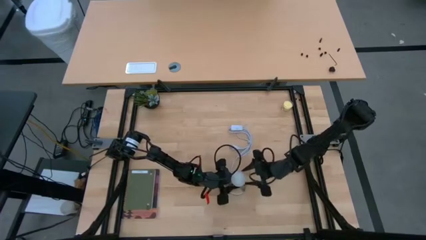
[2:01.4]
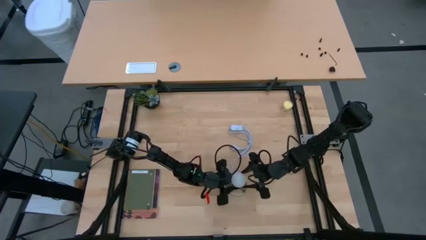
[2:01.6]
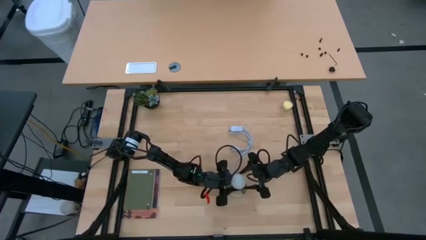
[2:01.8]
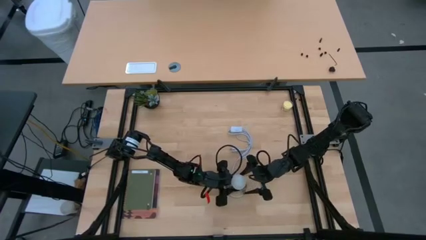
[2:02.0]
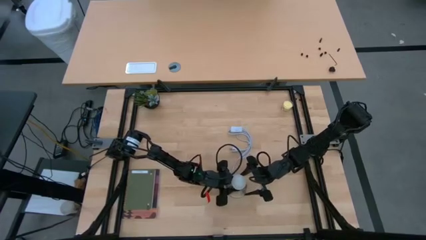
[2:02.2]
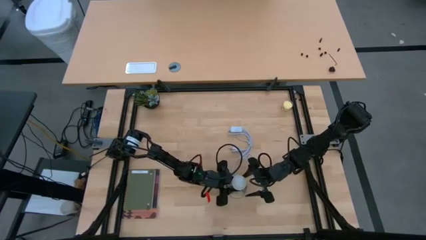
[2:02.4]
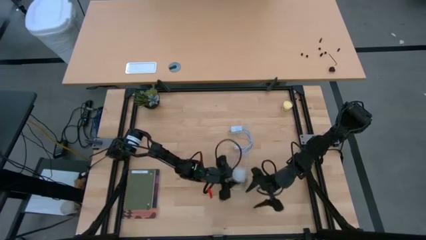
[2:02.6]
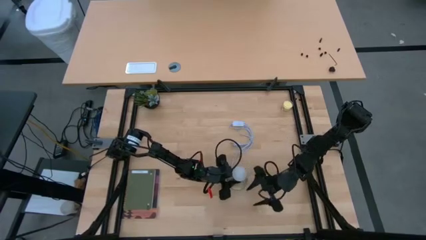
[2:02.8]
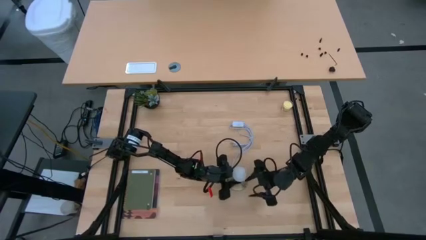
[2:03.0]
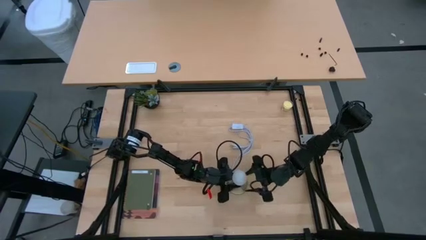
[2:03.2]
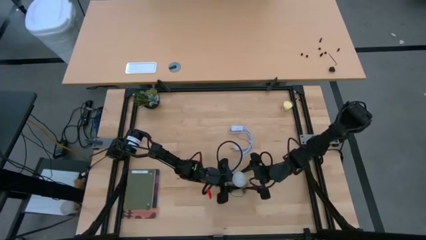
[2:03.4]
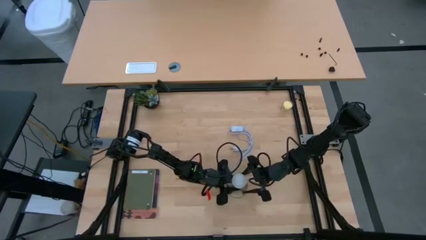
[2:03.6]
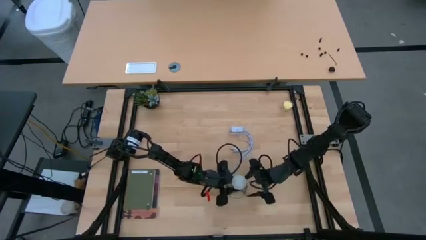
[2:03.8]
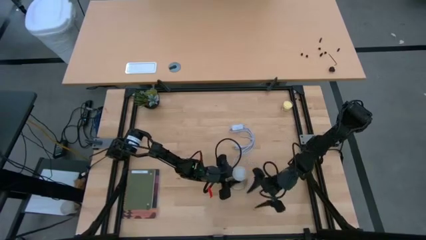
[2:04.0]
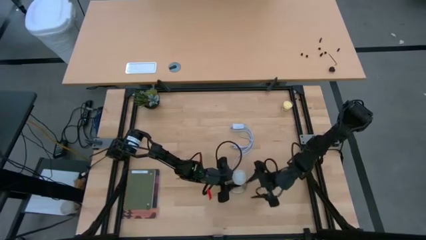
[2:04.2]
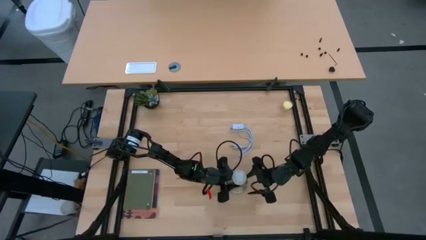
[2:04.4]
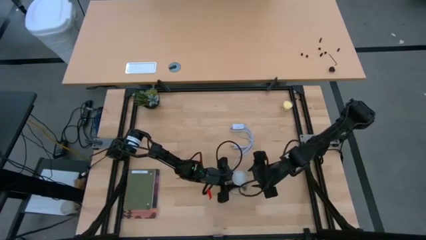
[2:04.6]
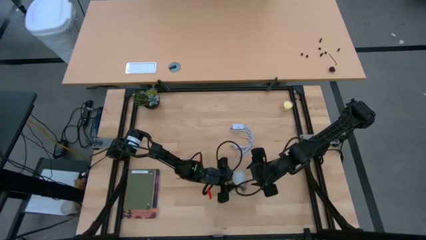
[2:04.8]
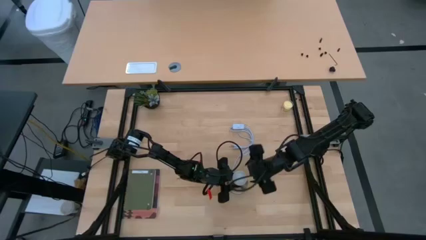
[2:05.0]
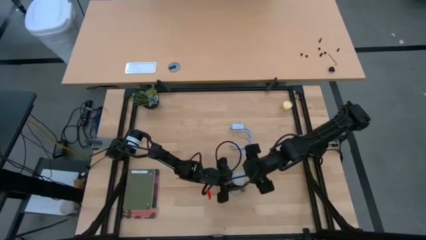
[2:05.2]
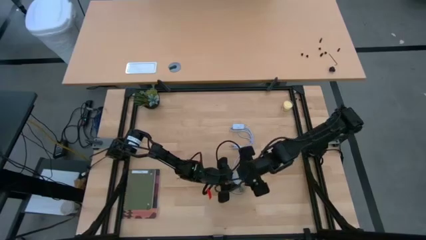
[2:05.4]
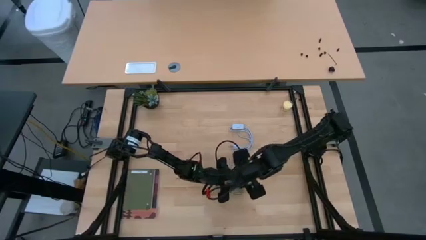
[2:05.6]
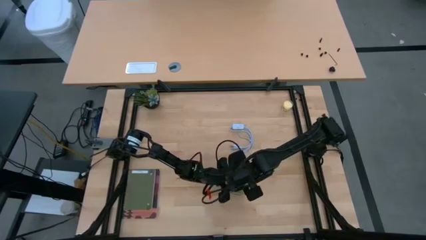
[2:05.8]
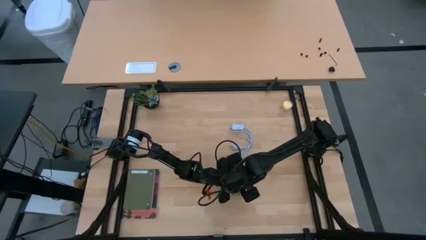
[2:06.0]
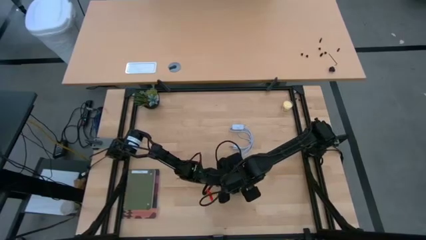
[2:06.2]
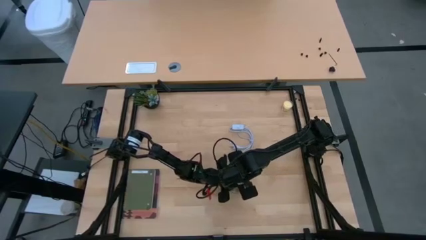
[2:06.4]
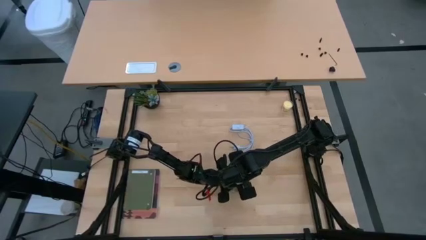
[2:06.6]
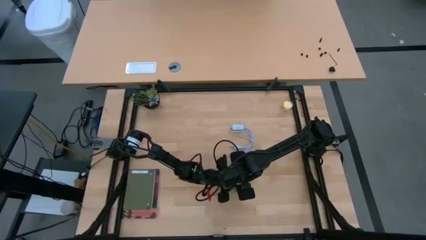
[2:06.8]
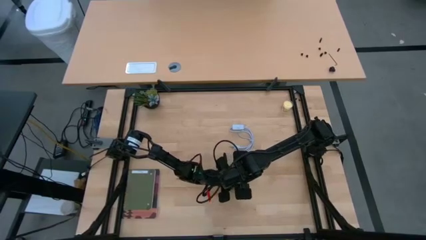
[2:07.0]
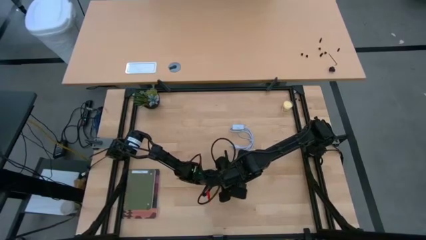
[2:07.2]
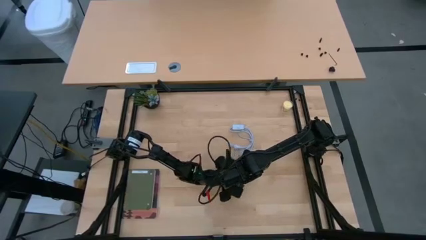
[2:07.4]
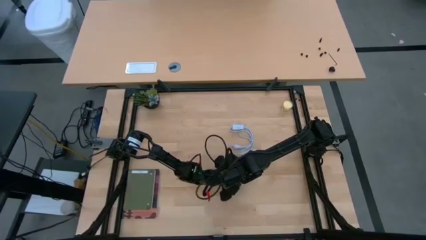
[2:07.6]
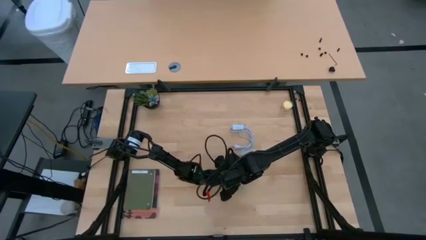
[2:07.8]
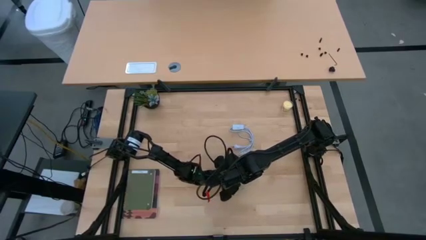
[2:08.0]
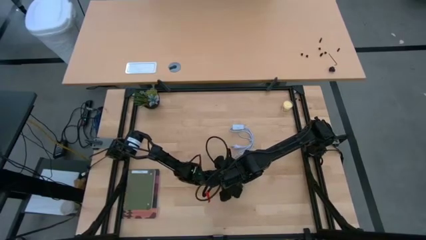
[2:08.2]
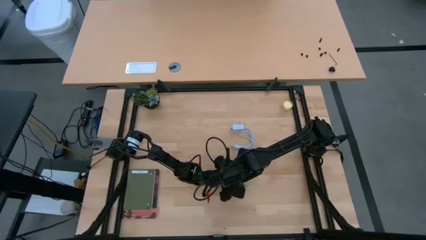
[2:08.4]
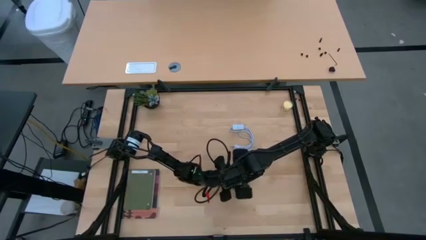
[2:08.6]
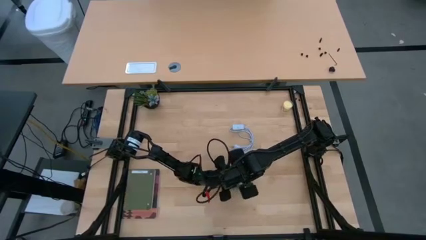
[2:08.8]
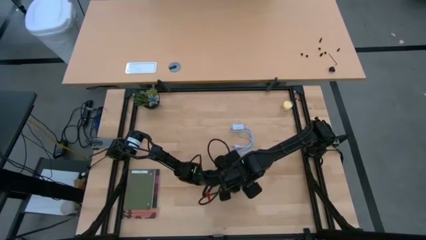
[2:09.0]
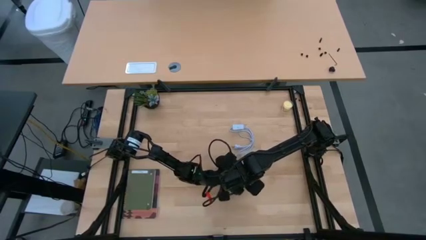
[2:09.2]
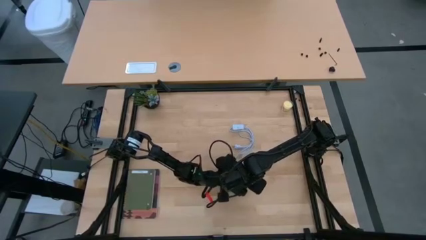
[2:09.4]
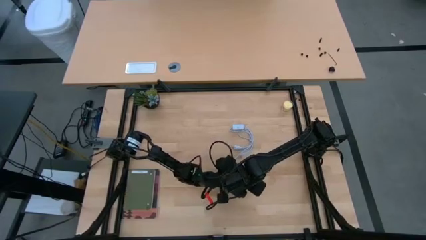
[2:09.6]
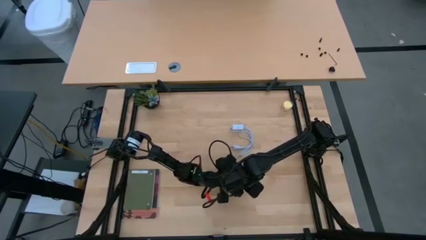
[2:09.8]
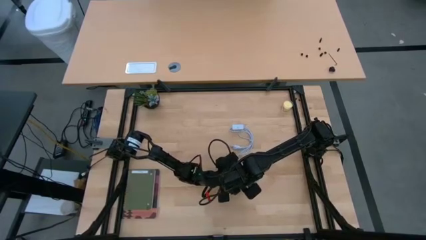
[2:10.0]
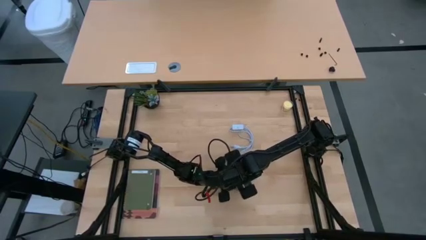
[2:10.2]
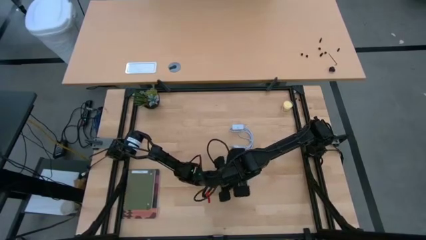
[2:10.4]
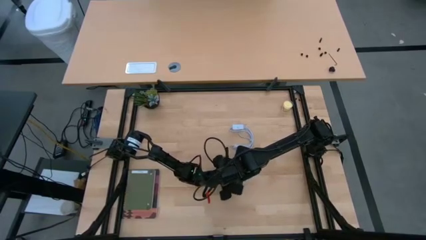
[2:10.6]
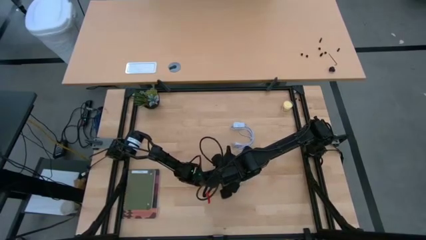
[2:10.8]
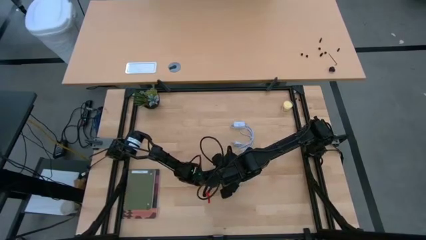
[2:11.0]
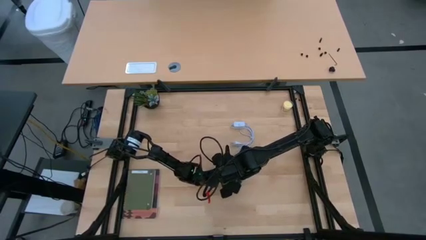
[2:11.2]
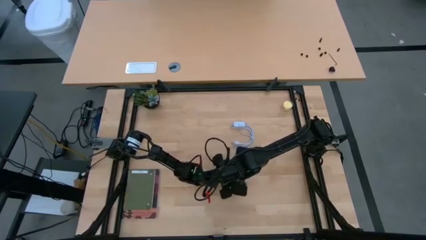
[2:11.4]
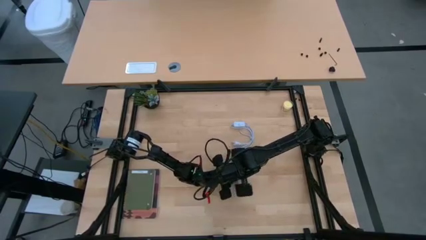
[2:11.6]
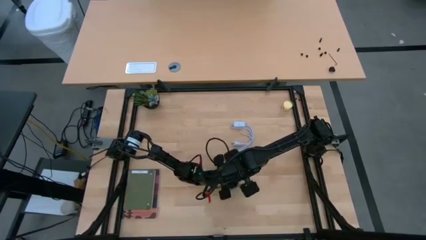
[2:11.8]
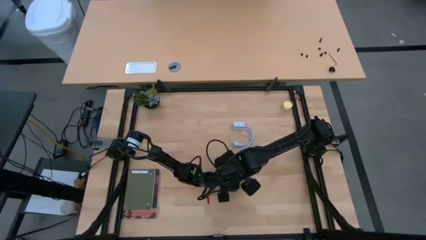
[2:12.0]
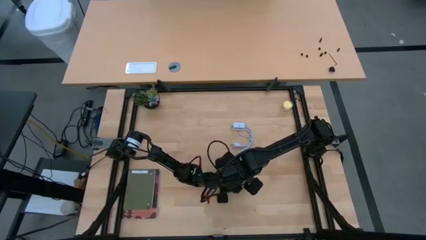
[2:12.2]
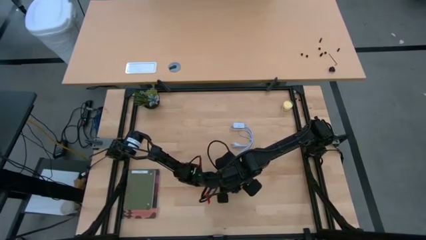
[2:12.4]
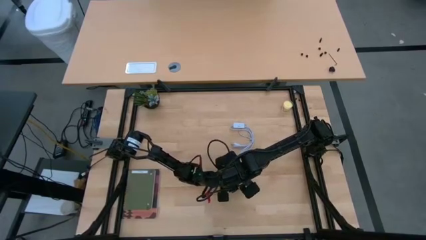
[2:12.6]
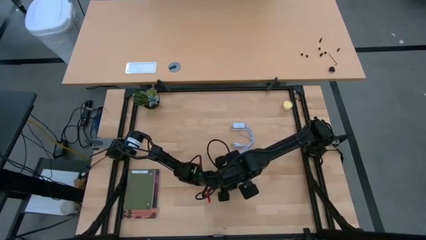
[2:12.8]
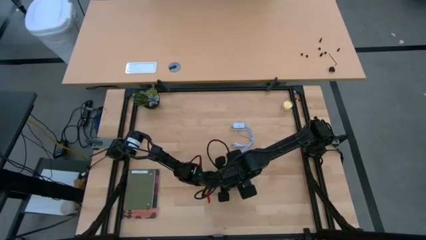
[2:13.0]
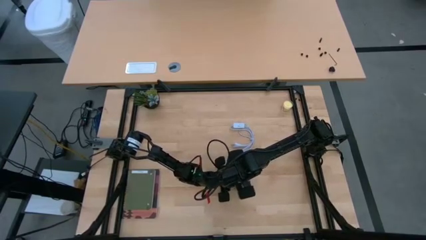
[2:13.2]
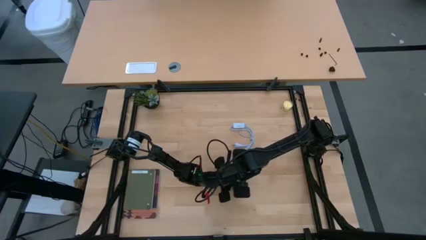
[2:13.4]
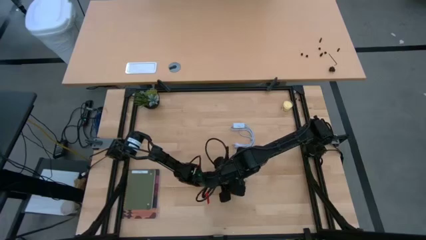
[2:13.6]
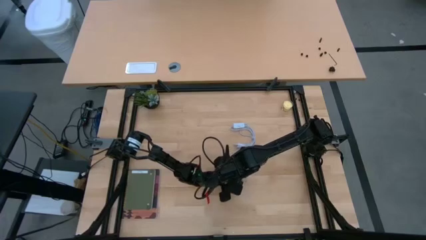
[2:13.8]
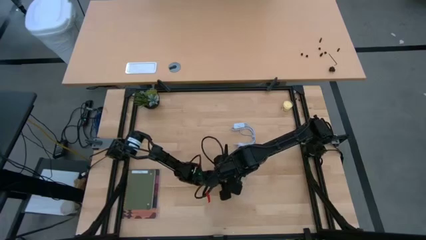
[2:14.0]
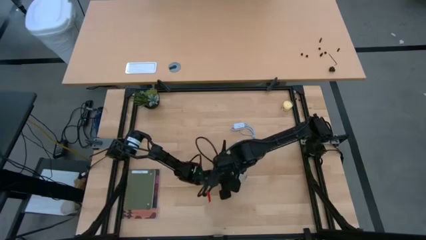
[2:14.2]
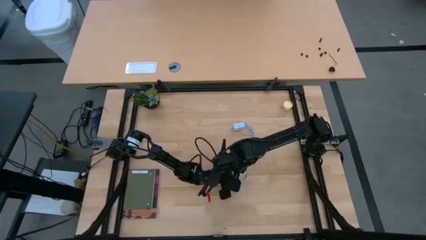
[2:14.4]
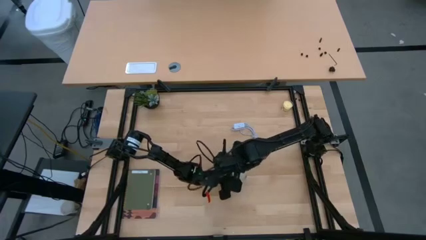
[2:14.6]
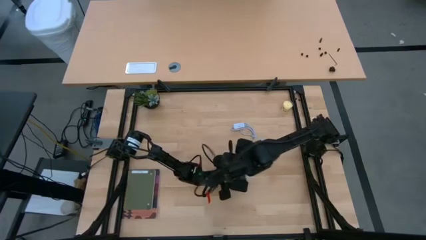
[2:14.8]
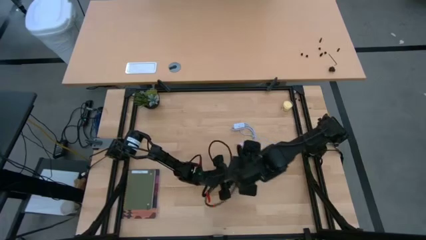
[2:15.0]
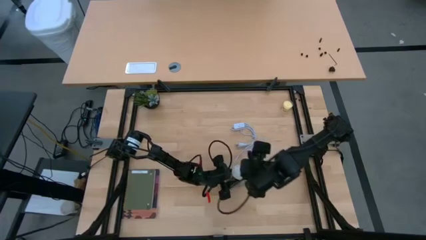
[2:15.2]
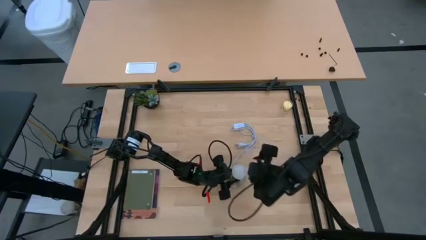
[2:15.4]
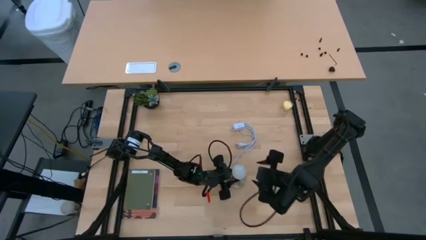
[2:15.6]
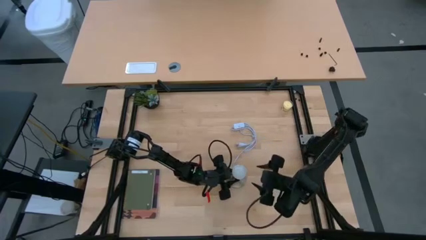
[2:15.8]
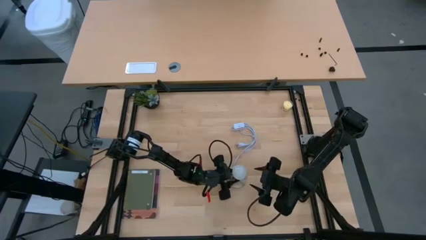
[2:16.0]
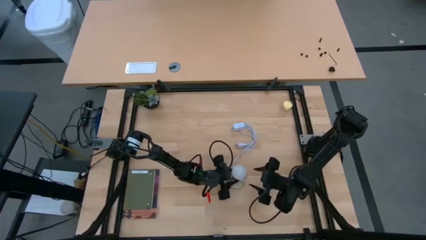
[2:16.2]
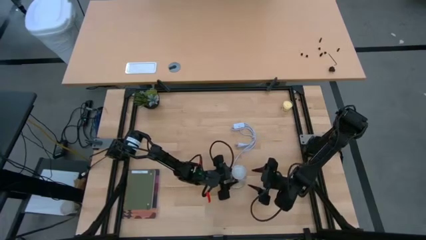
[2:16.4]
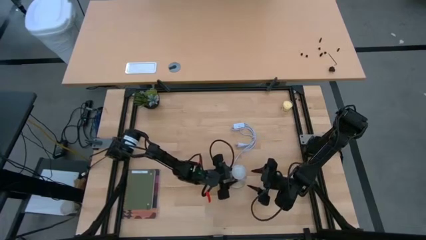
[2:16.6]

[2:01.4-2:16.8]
Task: Screw lightbulb
Insert the lightbulb into the lamp
